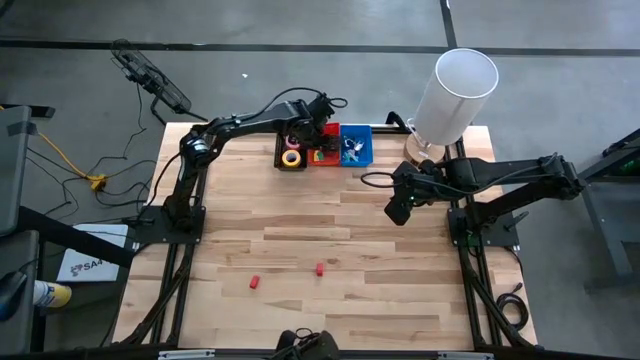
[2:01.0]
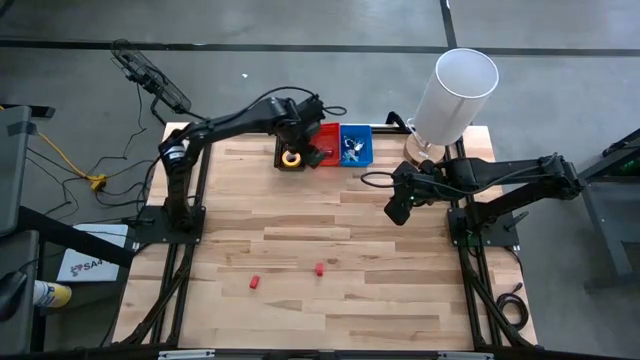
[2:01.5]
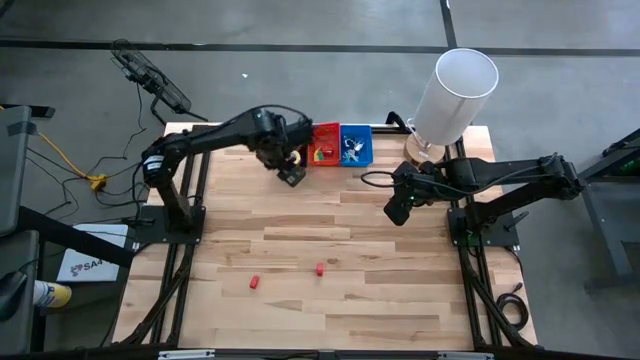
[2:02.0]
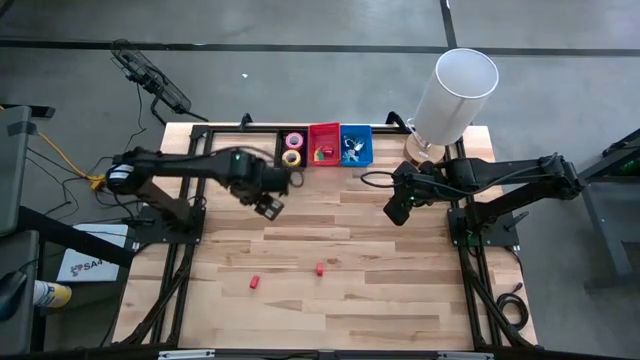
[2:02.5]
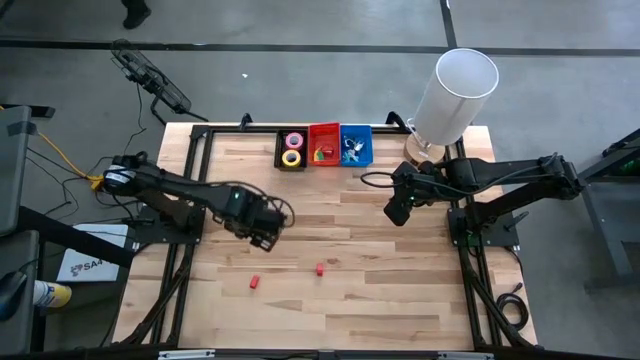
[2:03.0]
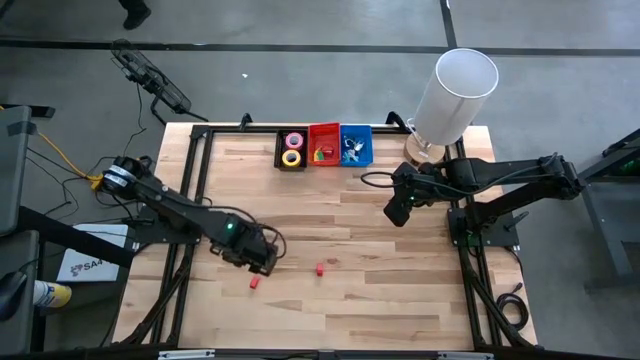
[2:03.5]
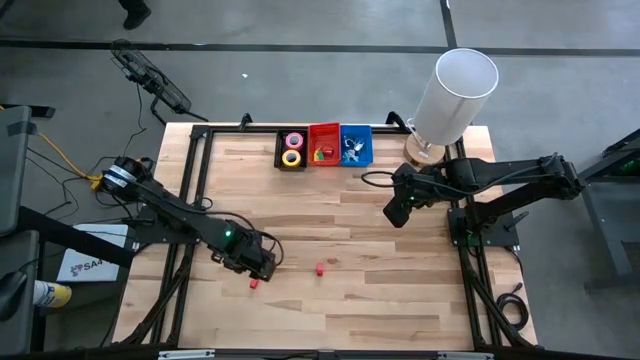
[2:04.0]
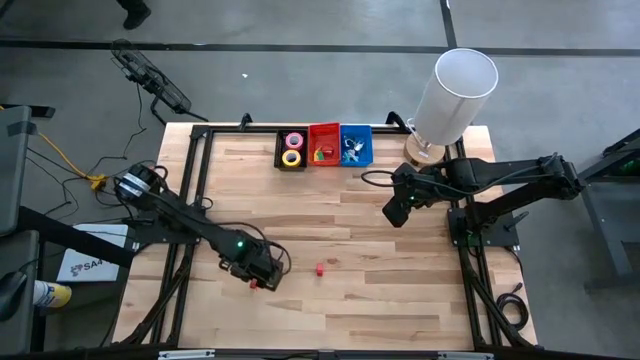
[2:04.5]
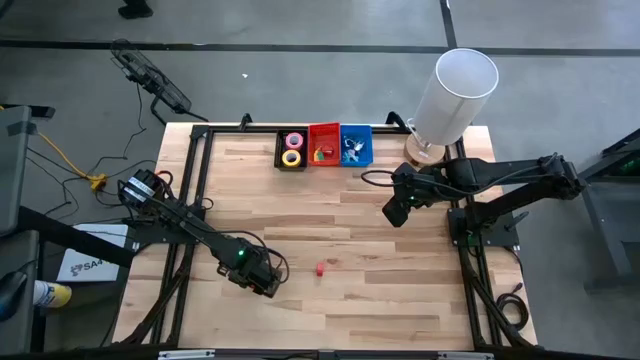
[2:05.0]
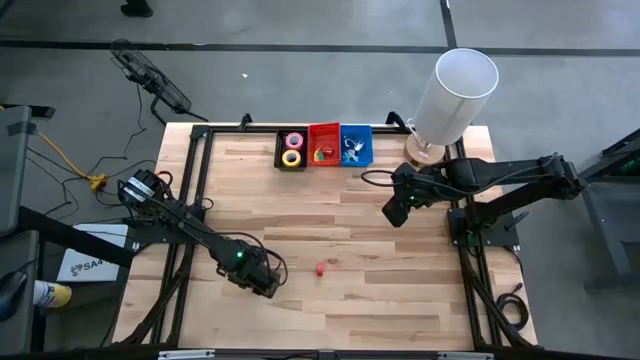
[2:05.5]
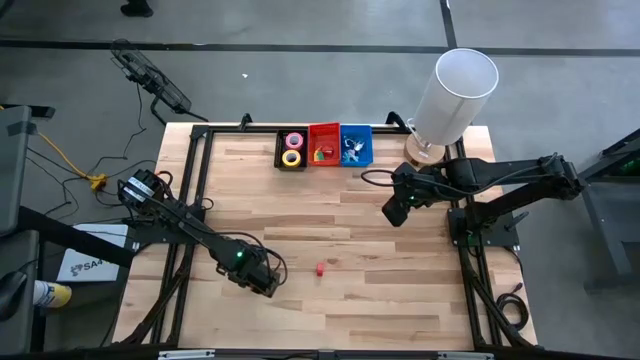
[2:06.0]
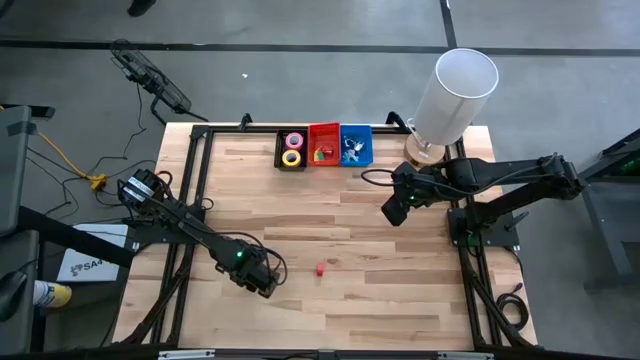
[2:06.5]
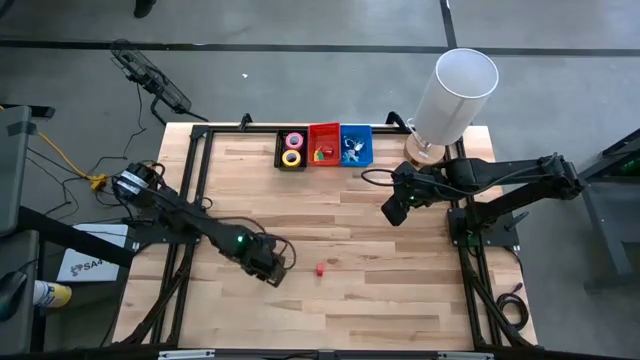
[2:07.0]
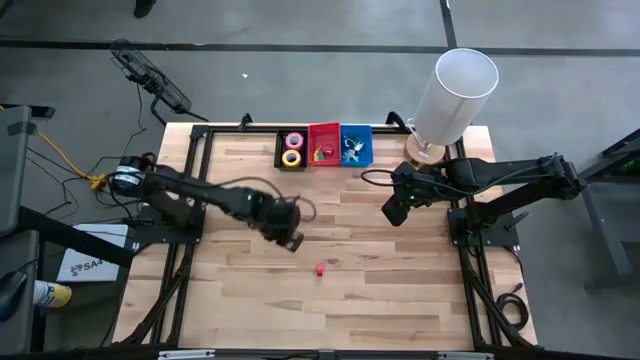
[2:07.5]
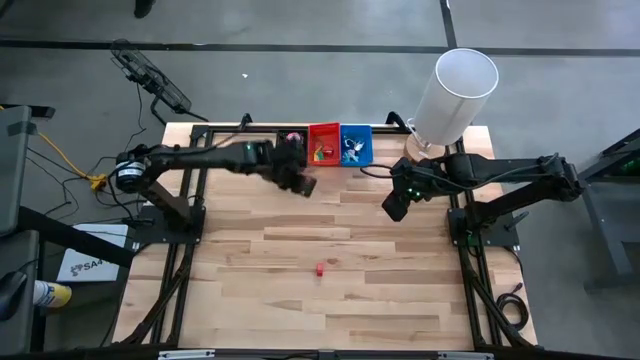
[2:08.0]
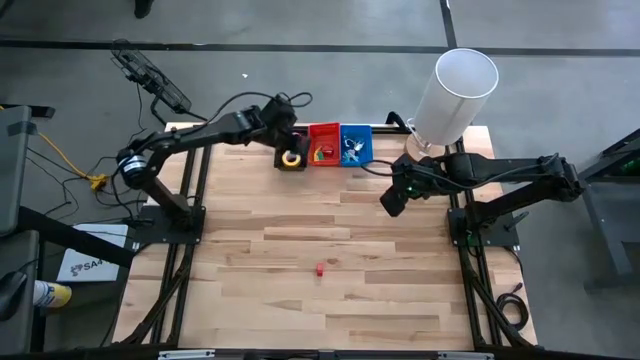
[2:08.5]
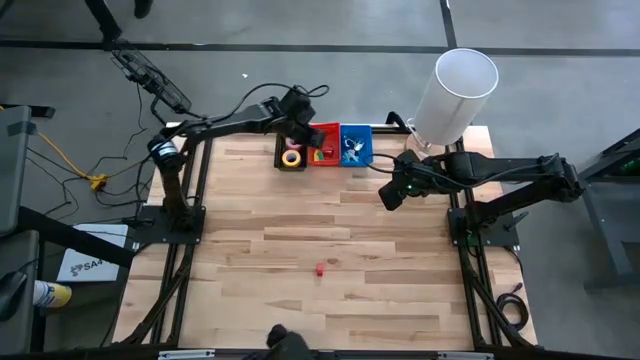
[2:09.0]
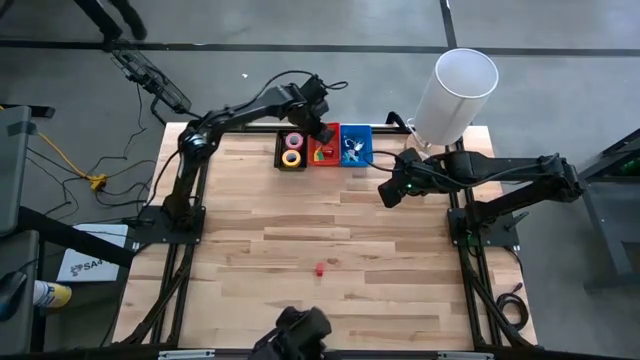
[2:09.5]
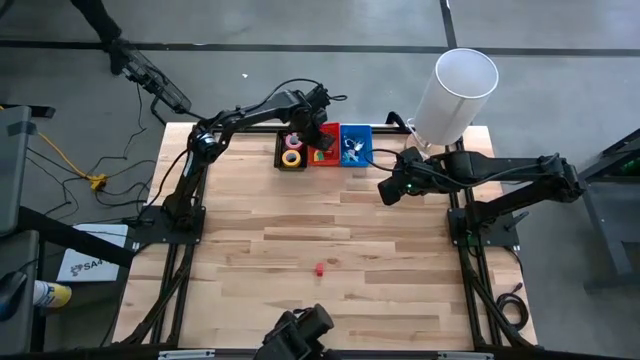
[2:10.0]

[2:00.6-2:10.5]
Task: Pick and place Stapler, Stapler remover, tape
Put the red stapler into the red bin

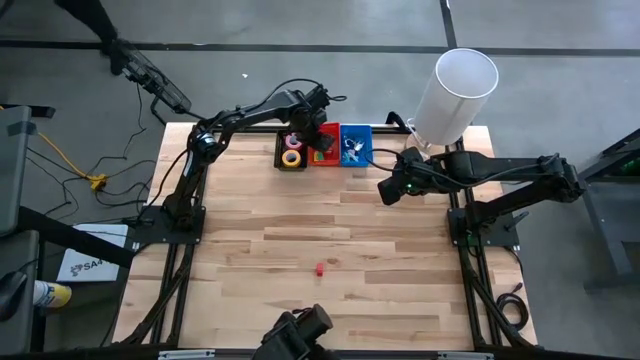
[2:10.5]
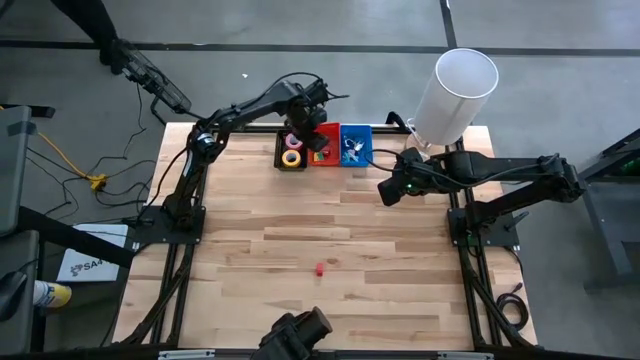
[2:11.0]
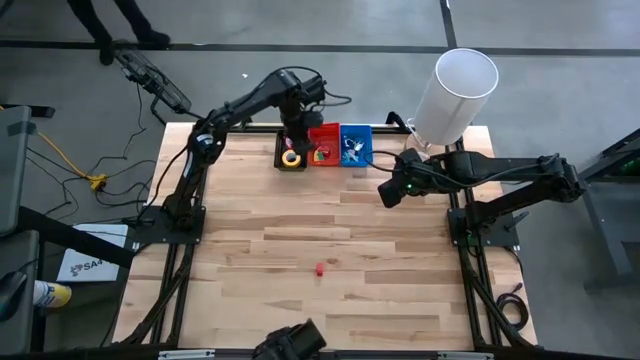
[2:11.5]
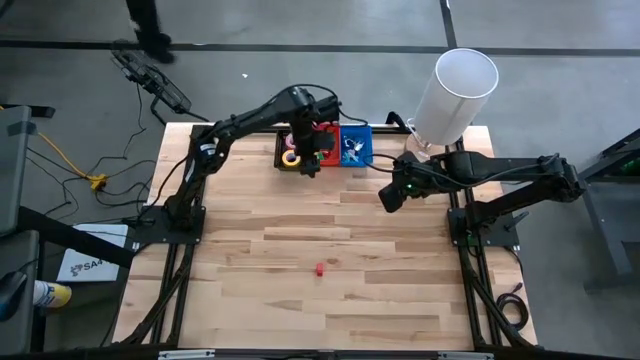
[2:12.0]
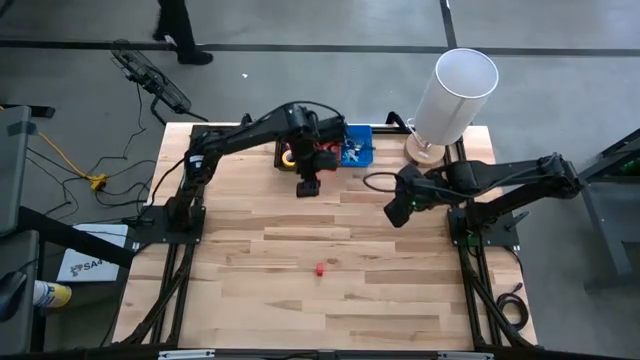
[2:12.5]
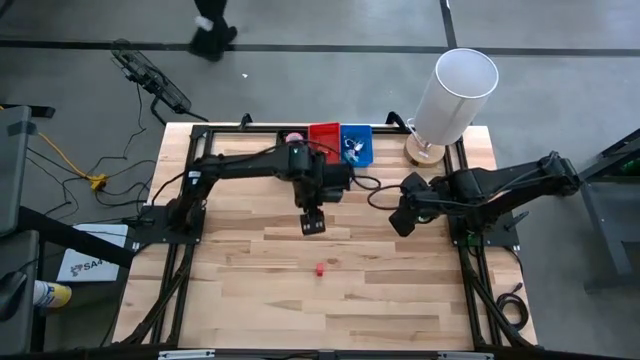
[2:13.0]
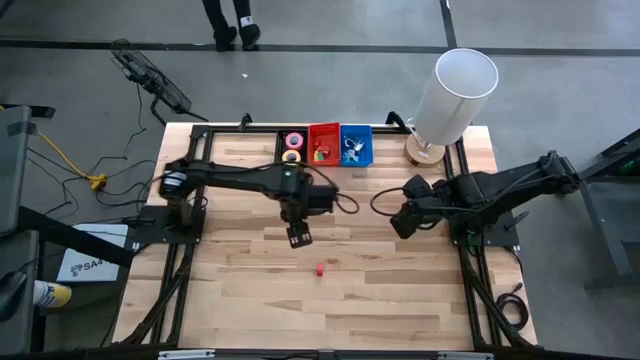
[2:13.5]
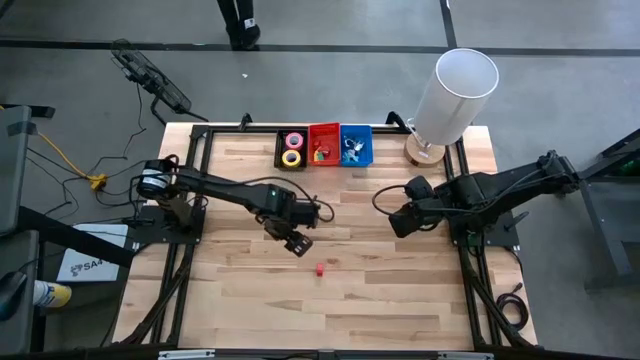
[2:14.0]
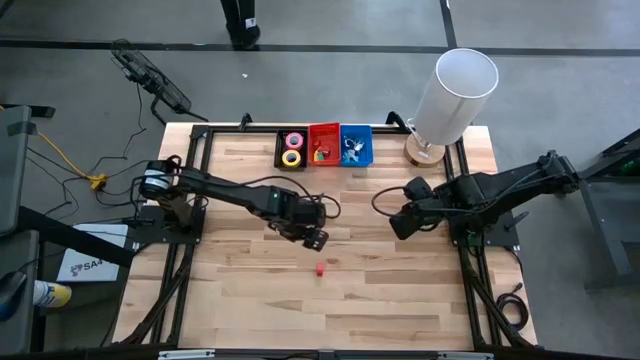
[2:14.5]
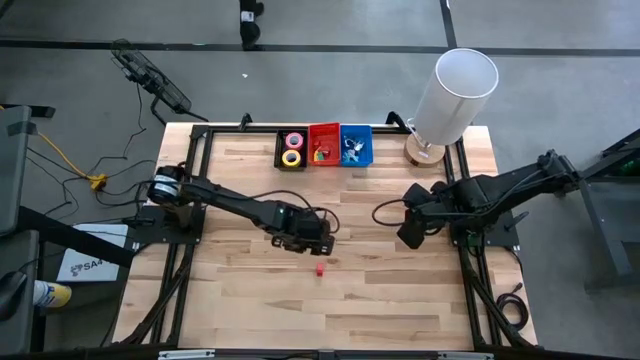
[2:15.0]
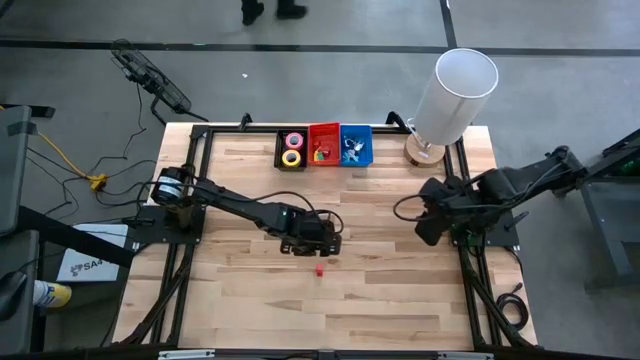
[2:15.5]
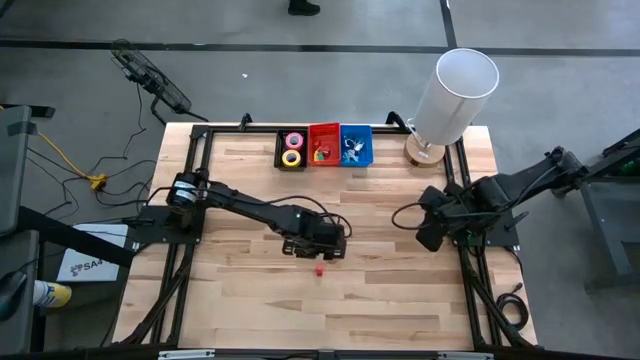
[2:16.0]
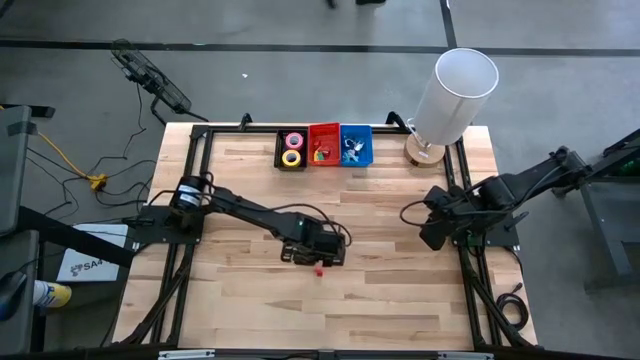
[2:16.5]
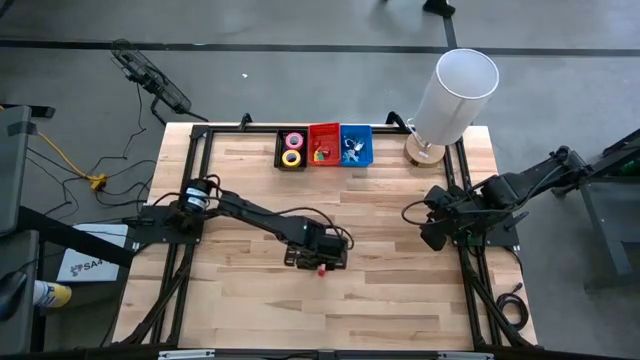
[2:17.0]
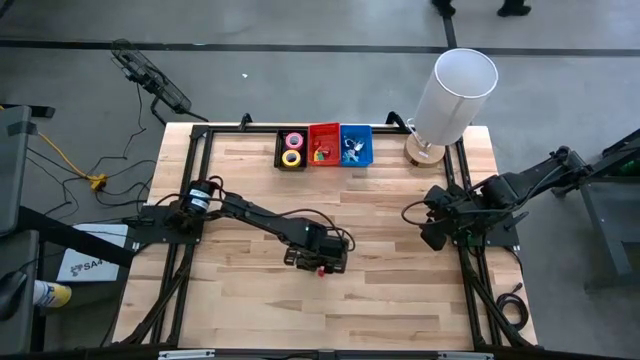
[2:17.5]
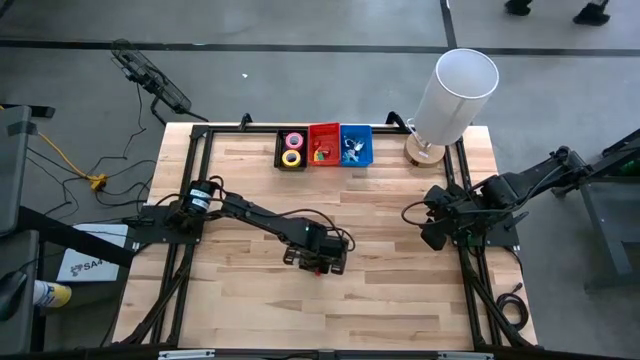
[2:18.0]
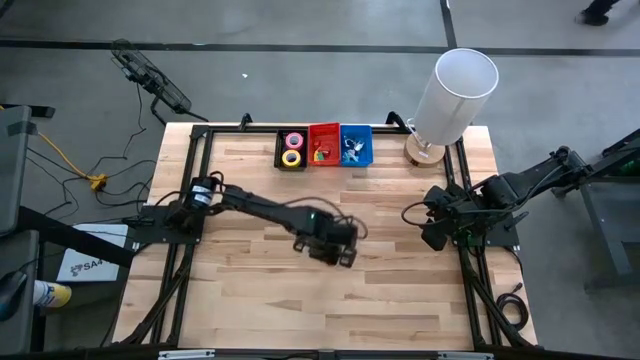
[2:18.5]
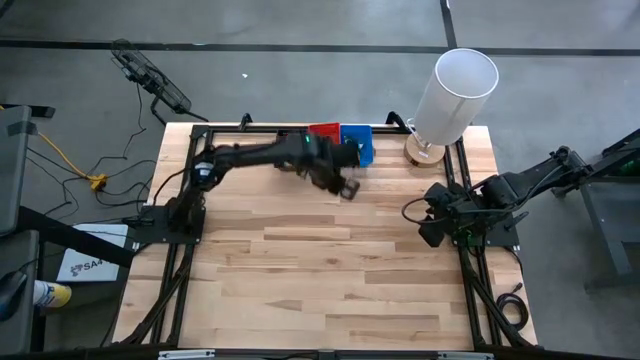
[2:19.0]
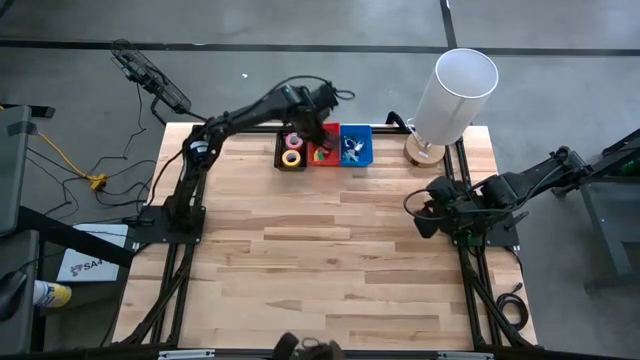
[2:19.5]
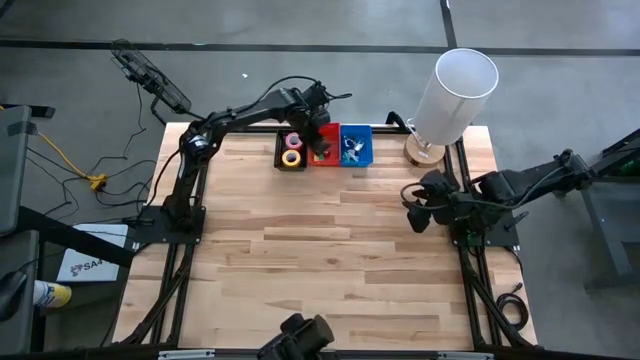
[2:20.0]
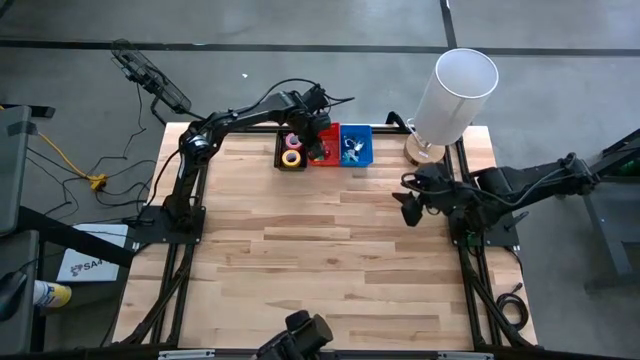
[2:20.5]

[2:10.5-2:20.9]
Put the red stapler into the red bin

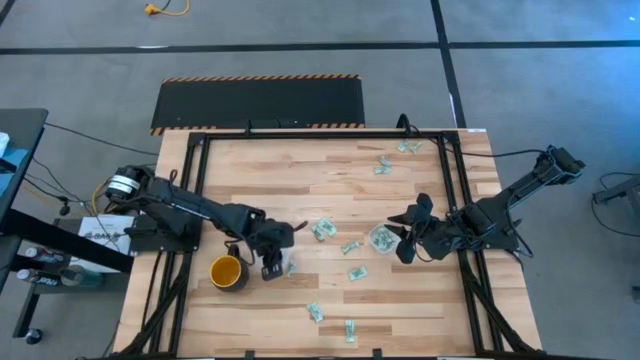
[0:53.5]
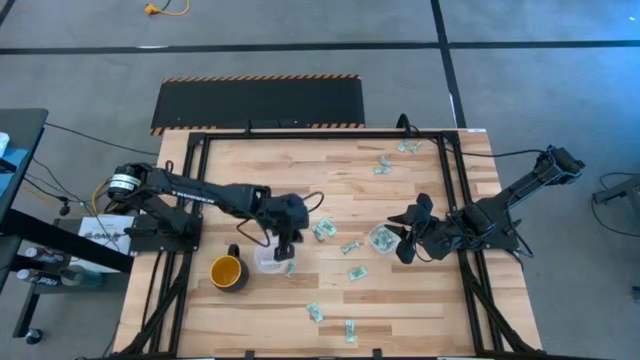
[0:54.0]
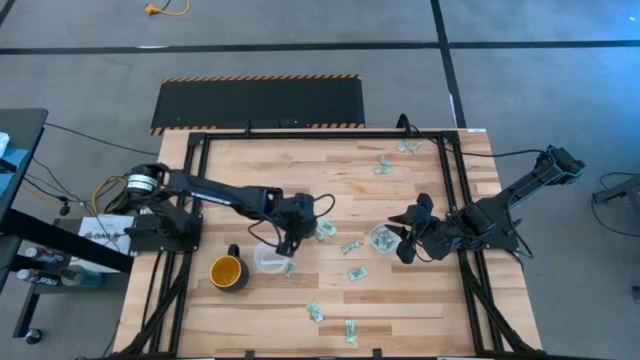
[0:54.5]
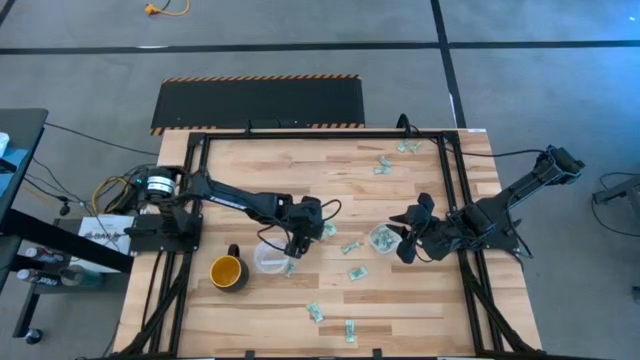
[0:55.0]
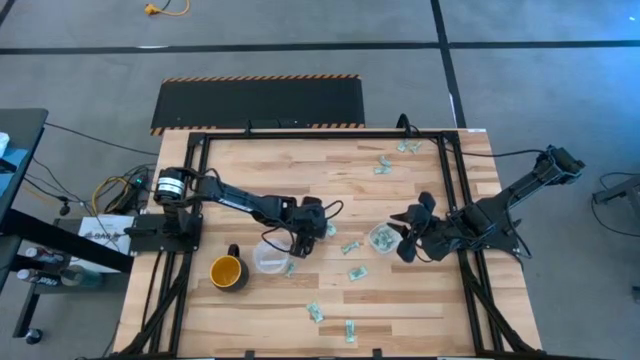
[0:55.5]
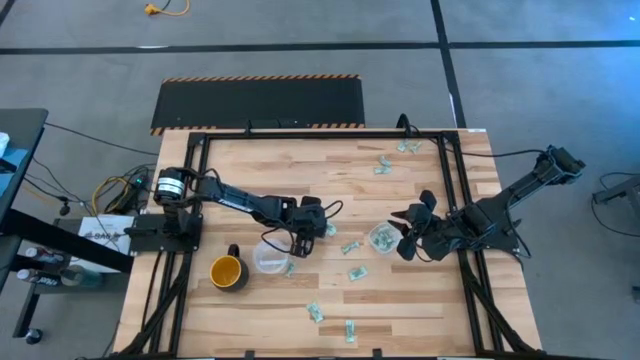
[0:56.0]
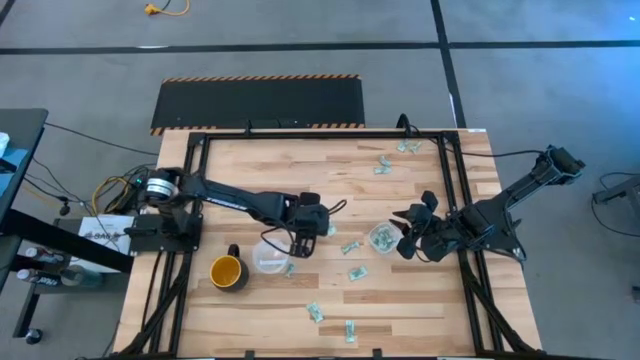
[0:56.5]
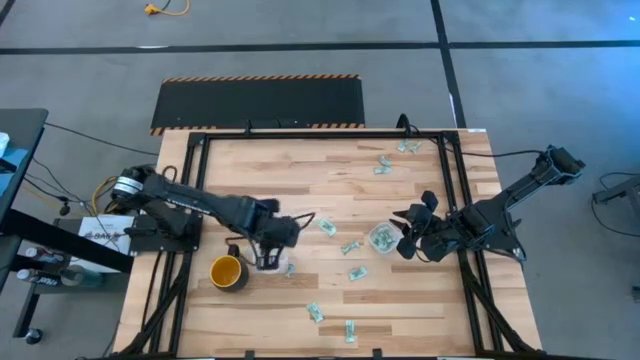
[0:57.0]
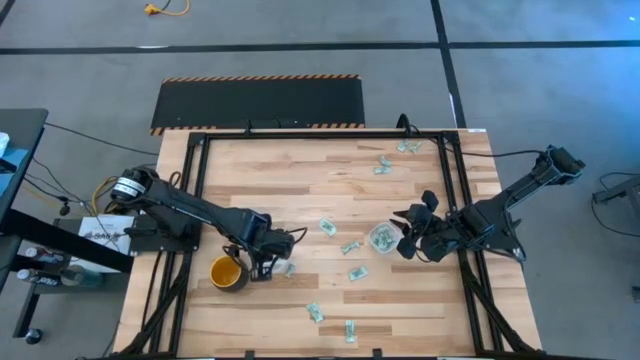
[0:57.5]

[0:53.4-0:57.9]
Task: Pick and place Stevia / Truvia into bins
Put the white stevia packet into the round transparent container
